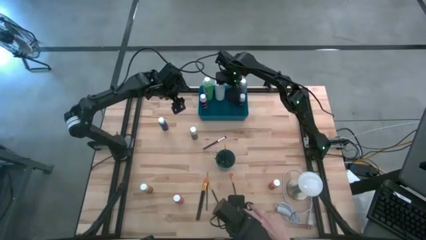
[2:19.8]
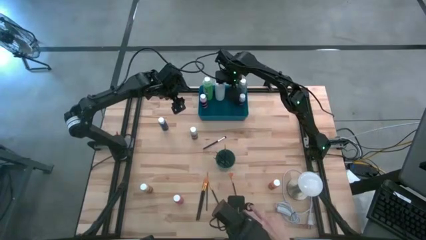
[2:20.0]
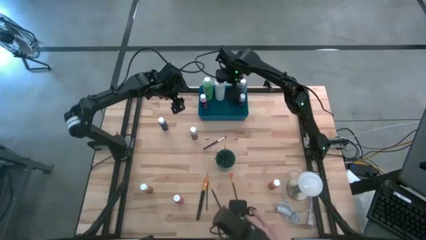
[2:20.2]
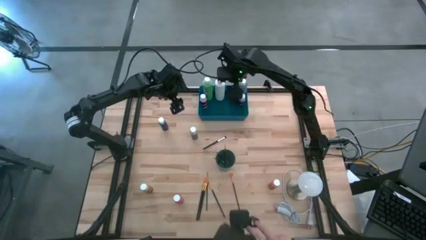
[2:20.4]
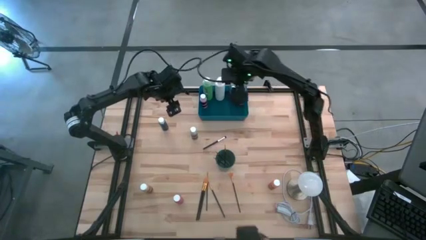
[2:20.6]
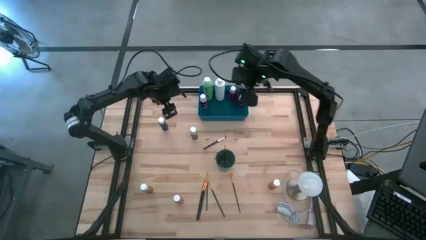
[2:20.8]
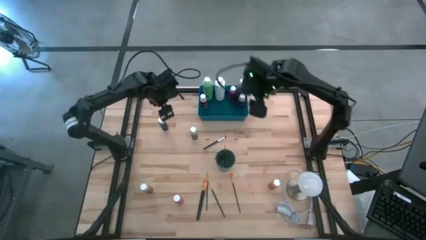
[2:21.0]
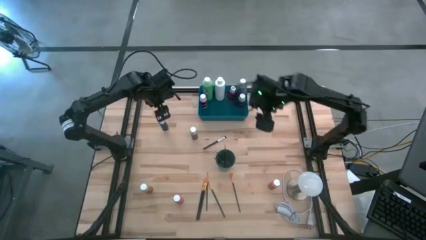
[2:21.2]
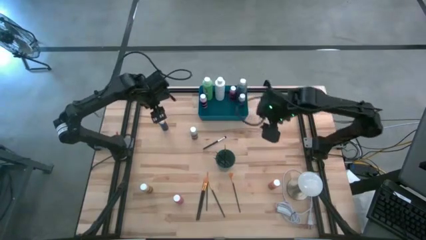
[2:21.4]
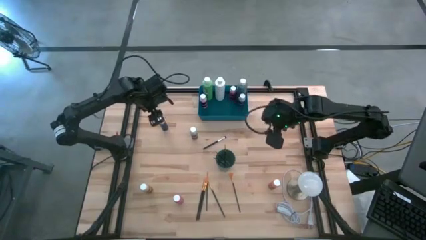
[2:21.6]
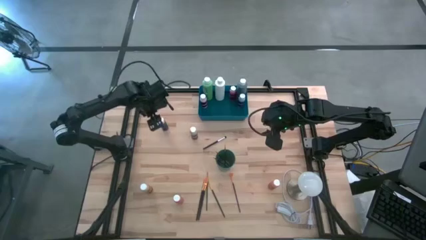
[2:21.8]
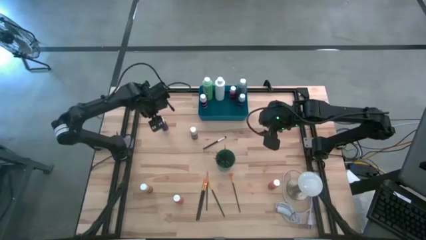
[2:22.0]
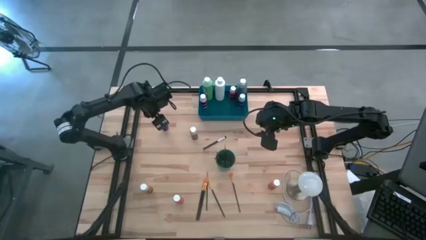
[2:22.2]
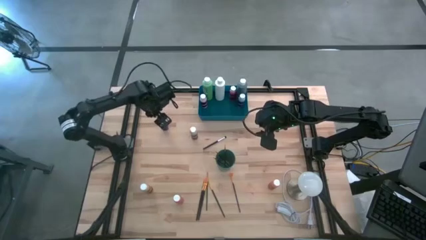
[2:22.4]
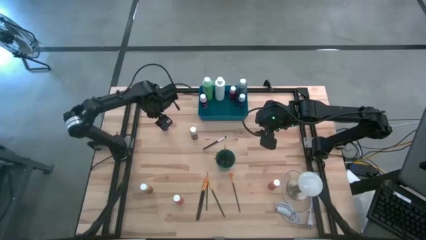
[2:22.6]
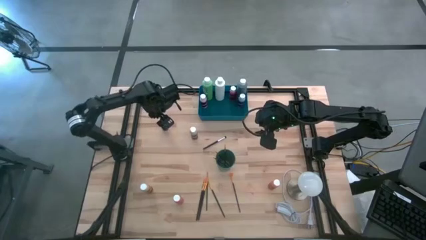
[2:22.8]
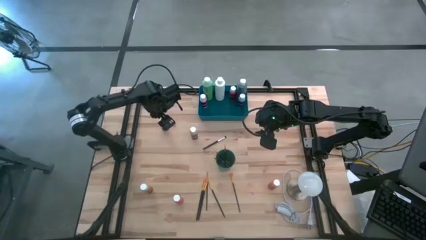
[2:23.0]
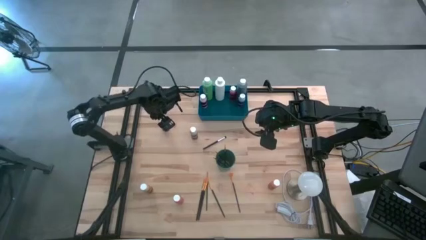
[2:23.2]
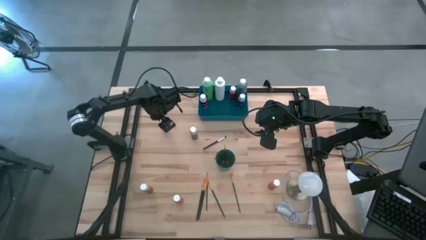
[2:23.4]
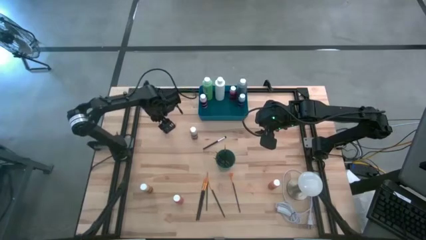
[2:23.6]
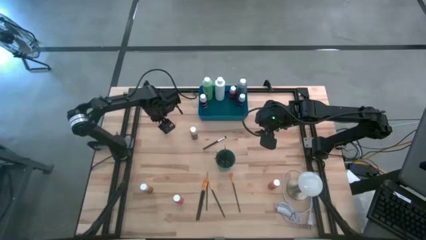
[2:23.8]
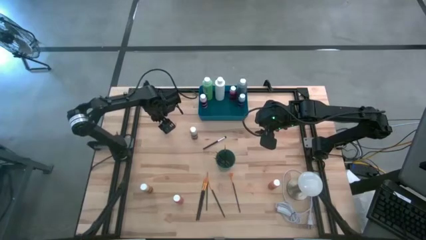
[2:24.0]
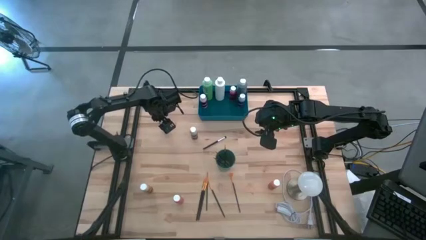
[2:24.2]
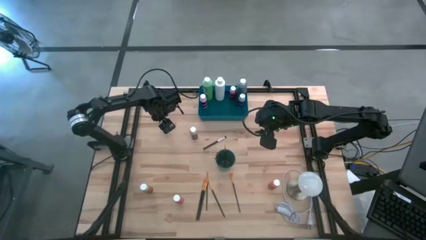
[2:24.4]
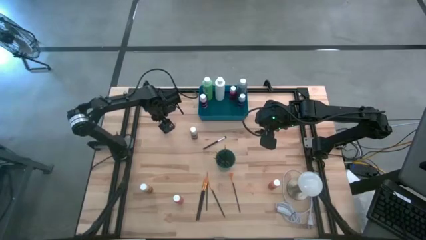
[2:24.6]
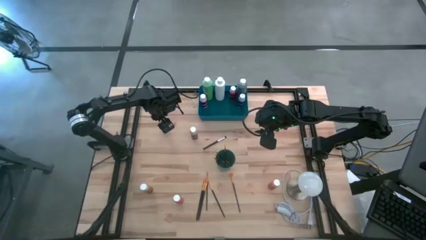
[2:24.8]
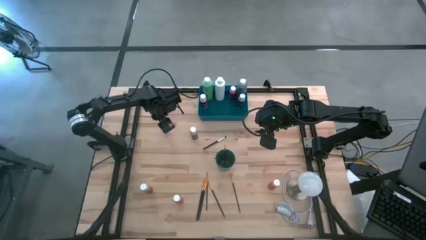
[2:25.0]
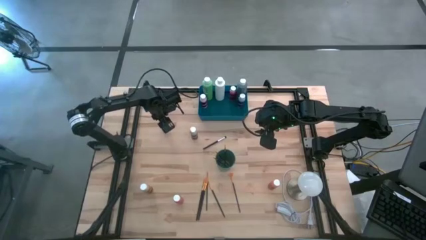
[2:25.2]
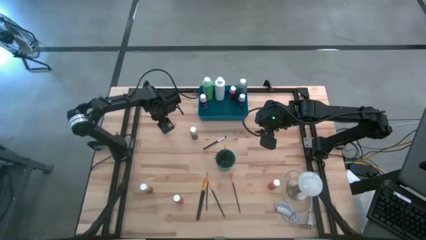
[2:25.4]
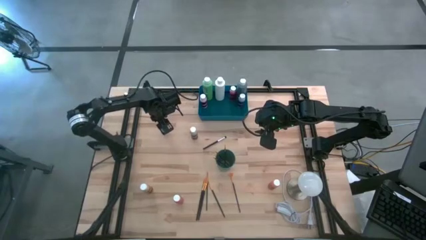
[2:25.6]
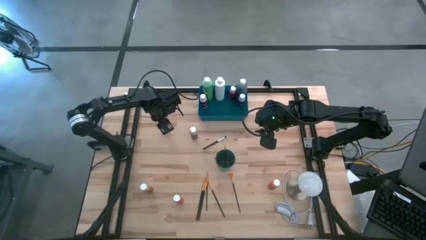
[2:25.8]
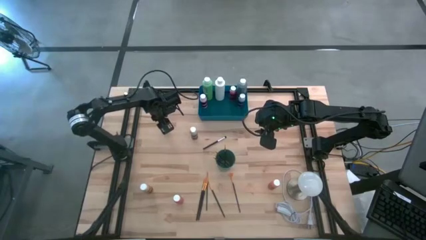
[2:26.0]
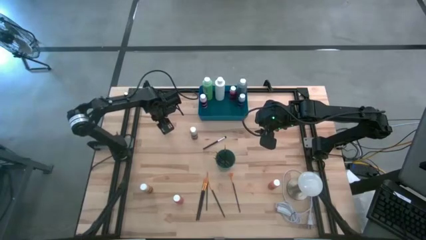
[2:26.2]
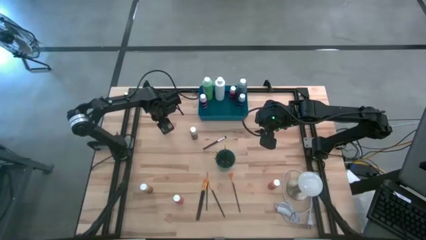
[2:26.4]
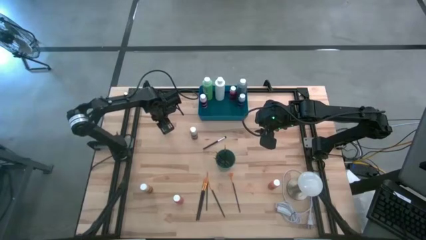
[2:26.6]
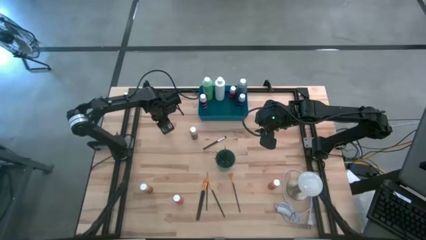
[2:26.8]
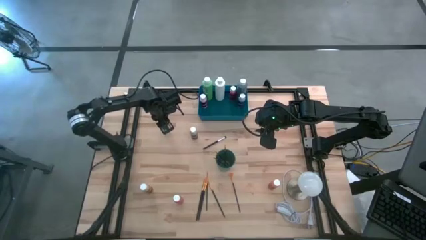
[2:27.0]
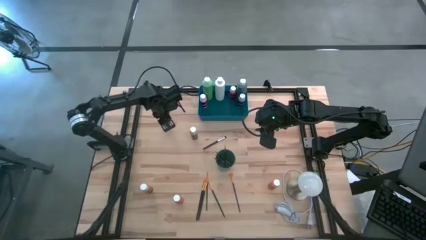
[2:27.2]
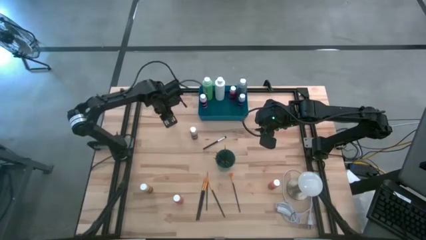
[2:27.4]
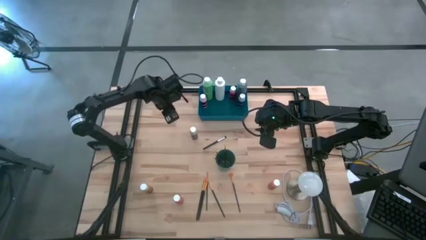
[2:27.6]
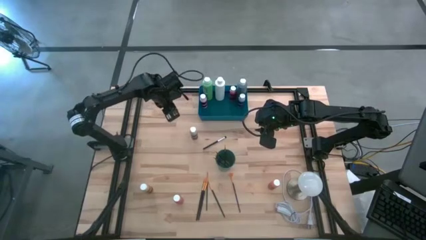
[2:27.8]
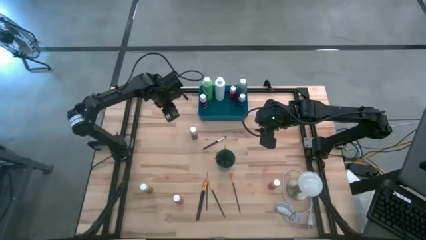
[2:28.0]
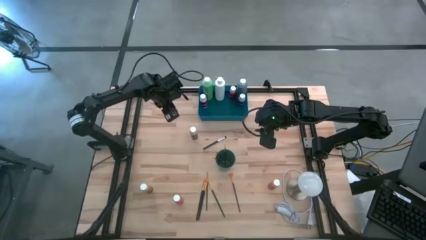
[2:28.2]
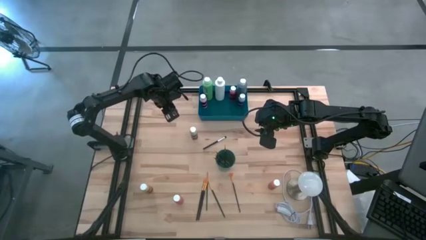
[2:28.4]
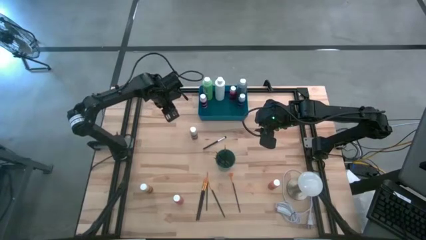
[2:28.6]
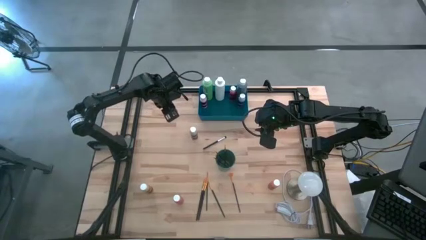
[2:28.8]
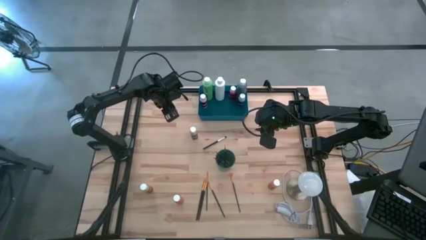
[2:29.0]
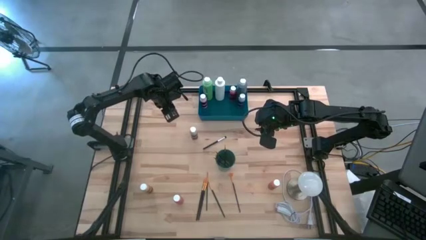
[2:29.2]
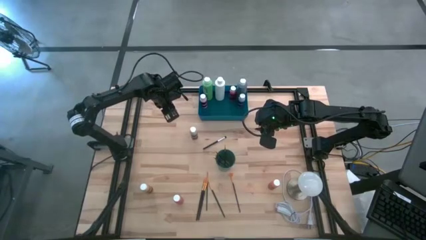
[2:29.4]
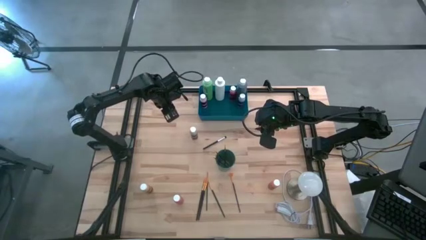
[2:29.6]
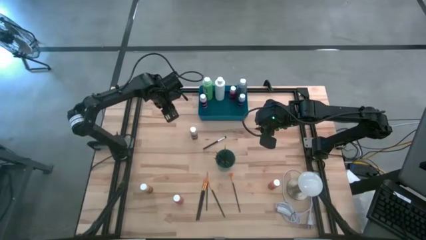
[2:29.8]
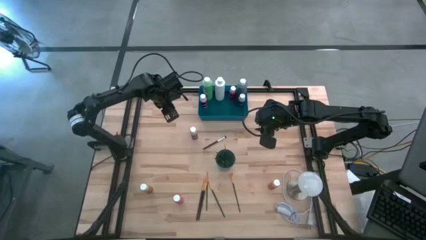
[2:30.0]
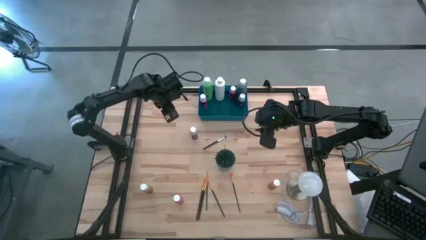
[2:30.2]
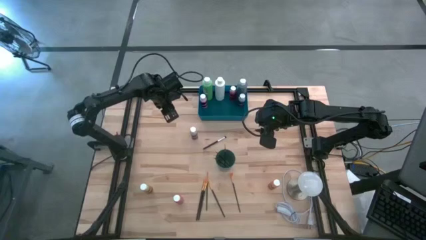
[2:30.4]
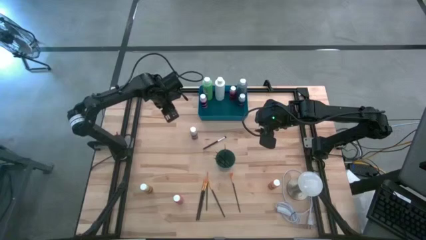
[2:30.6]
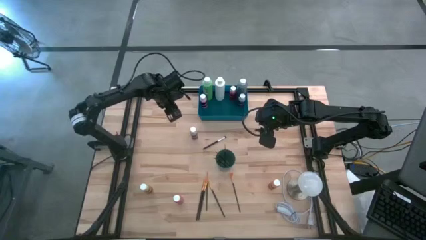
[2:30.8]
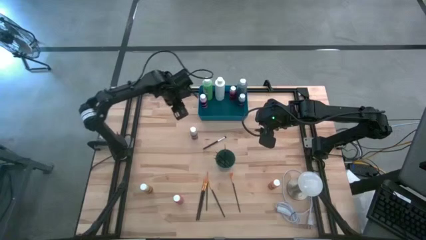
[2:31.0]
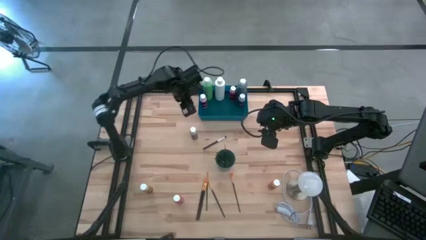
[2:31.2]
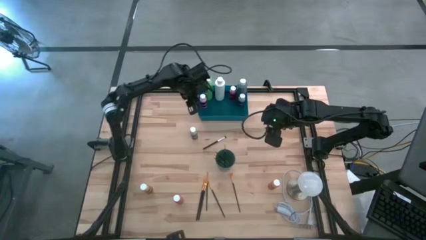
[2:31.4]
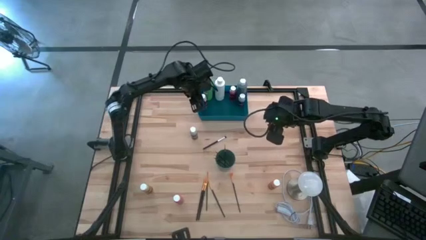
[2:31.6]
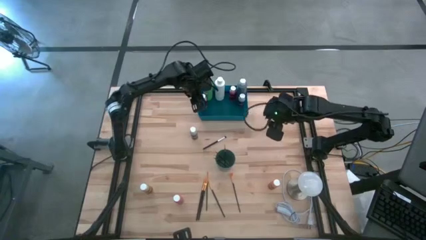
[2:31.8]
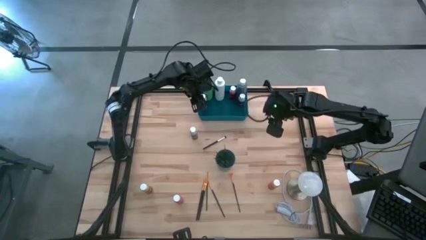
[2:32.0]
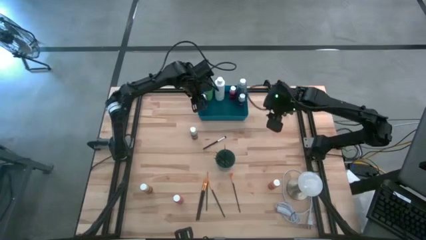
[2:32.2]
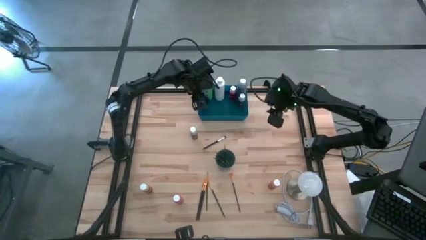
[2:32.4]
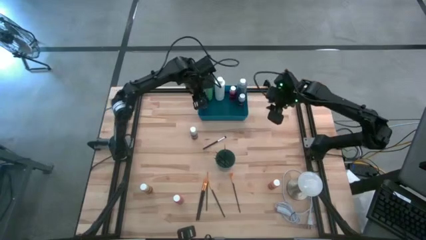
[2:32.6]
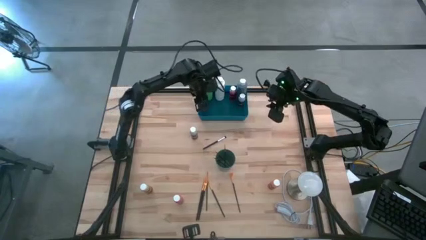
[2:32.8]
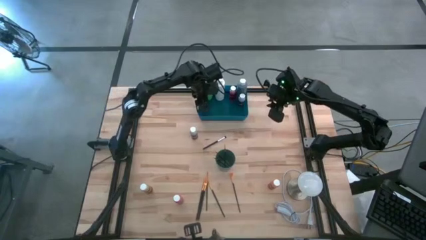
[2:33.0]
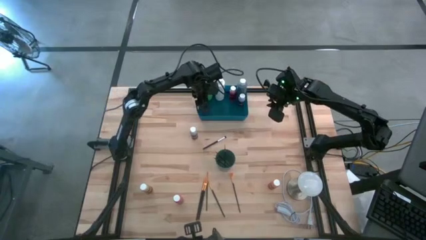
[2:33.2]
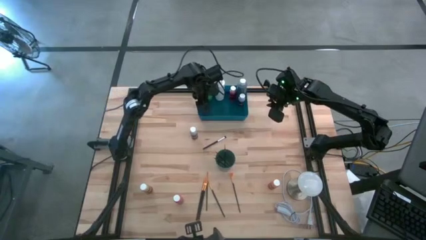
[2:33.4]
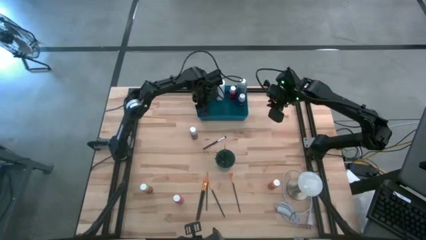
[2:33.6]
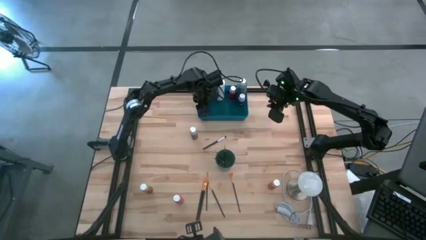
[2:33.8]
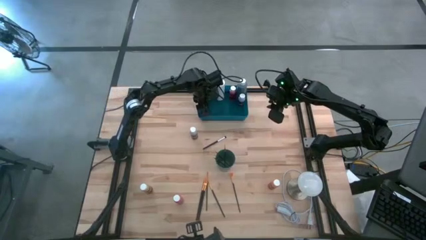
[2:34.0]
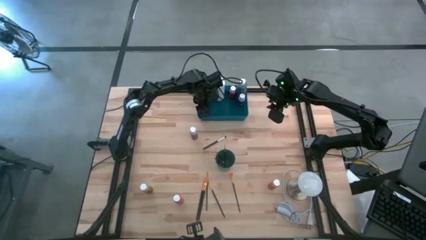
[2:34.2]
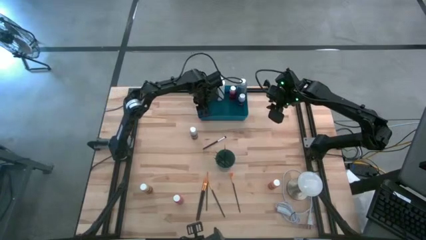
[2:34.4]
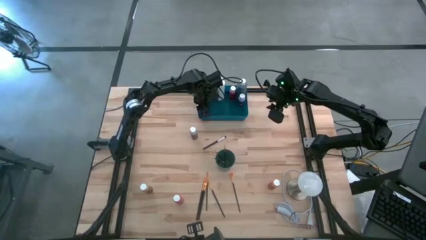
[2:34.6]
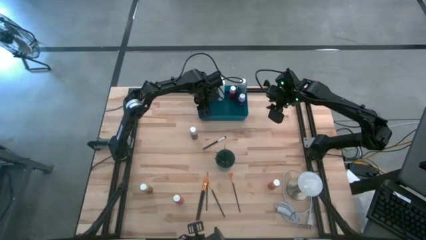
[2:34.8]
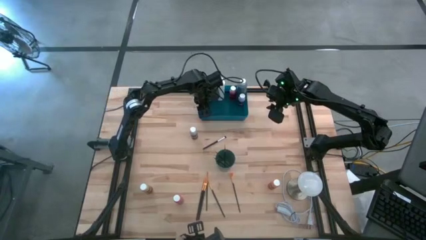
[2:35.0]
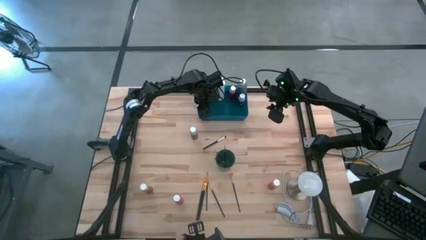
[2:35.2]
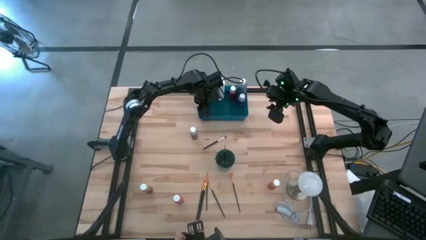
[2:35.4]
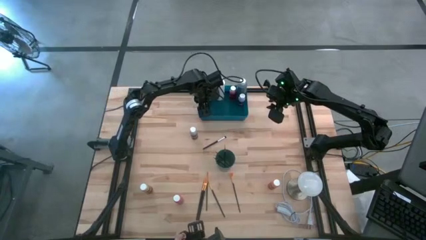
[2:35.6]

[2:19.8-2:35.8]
Task: Pick & Place Paint Supplies
Put the black blue paint bottle into the blue bin
